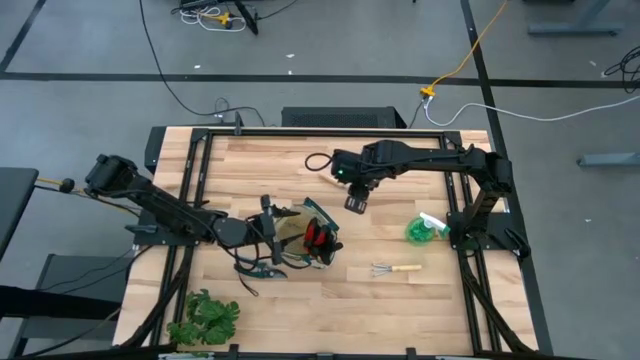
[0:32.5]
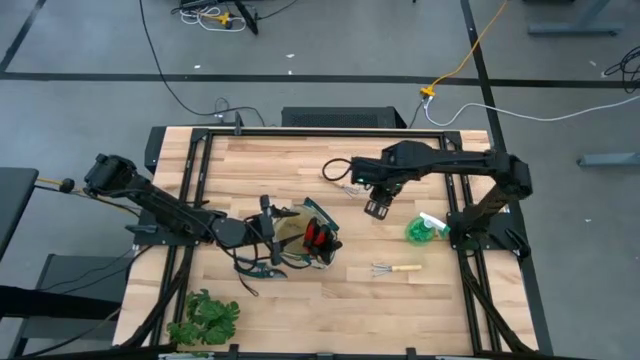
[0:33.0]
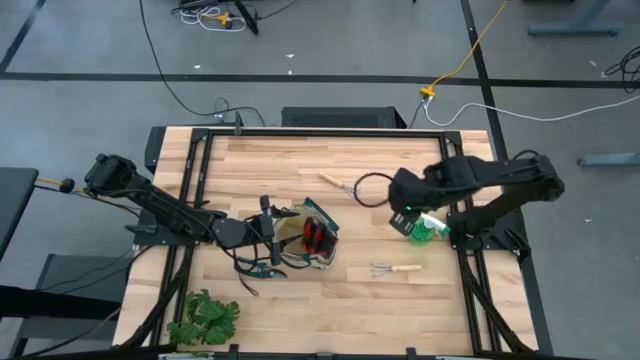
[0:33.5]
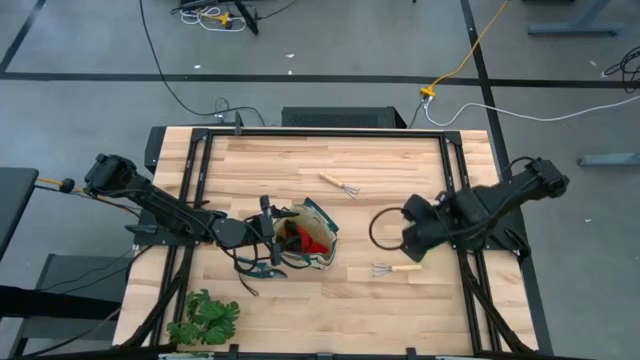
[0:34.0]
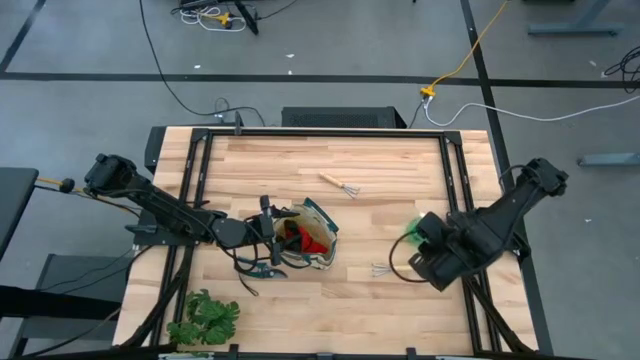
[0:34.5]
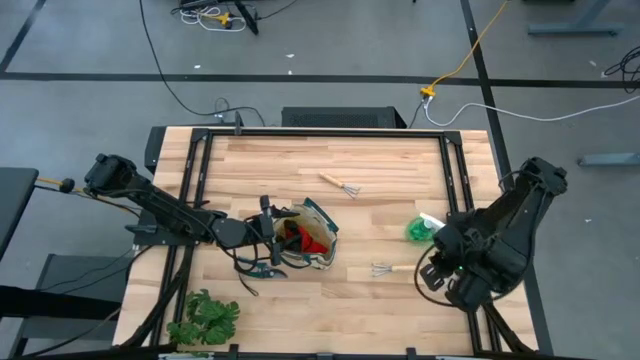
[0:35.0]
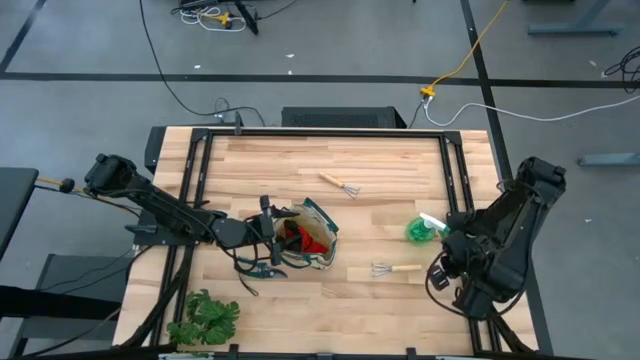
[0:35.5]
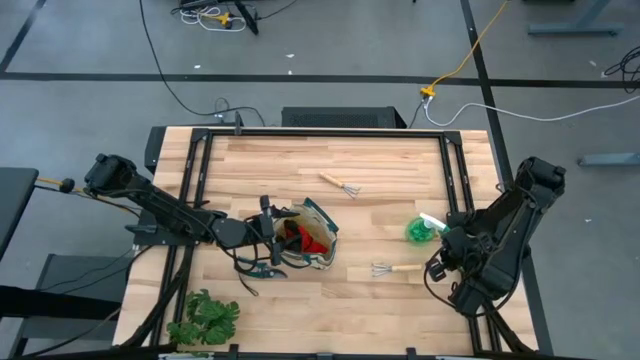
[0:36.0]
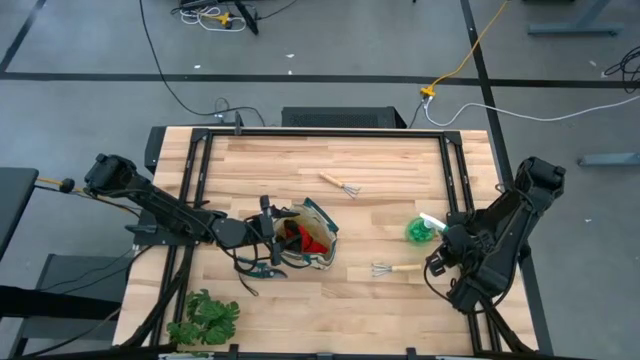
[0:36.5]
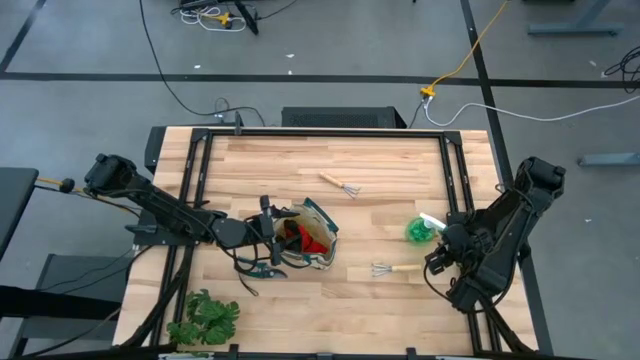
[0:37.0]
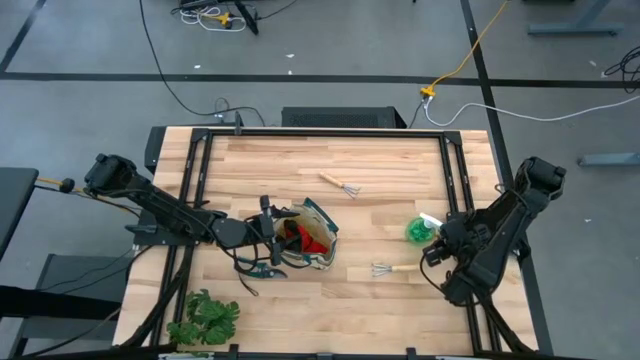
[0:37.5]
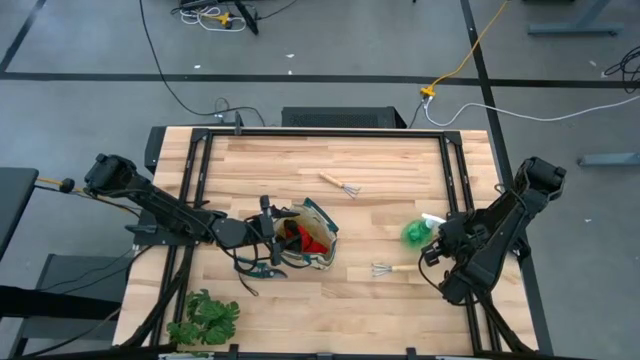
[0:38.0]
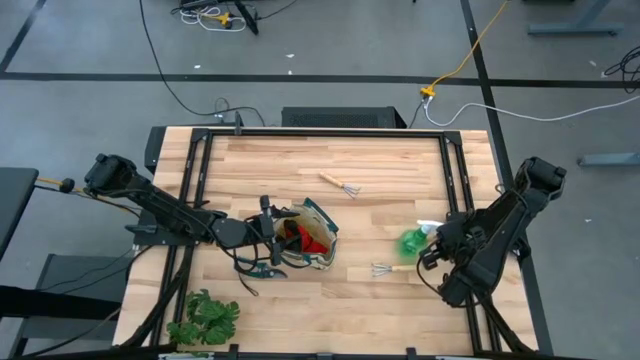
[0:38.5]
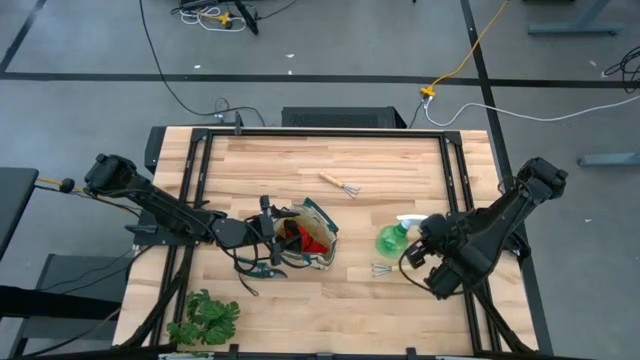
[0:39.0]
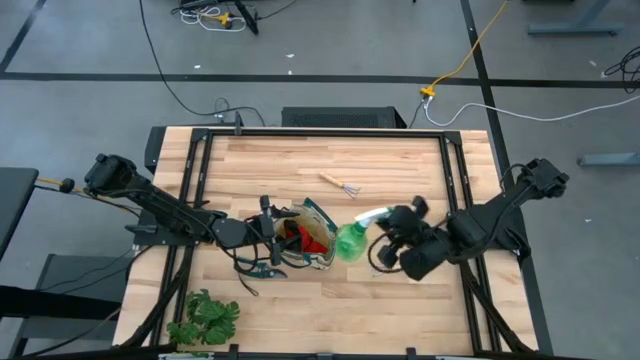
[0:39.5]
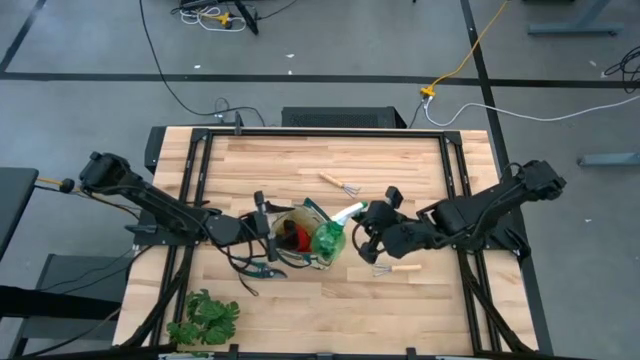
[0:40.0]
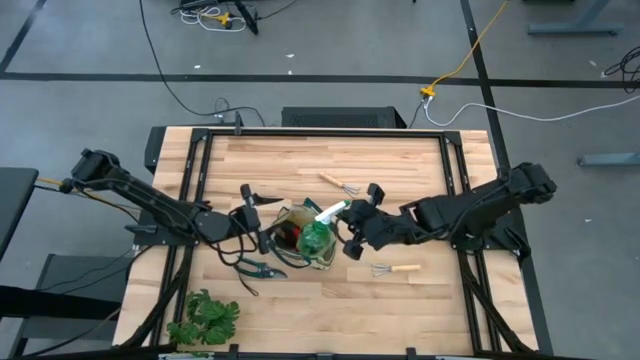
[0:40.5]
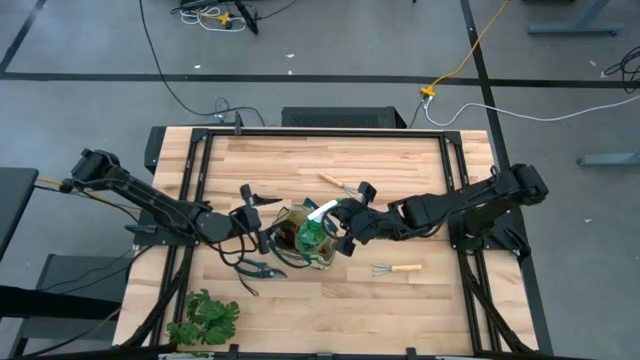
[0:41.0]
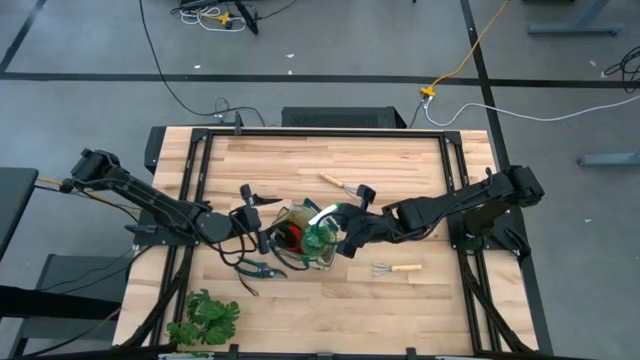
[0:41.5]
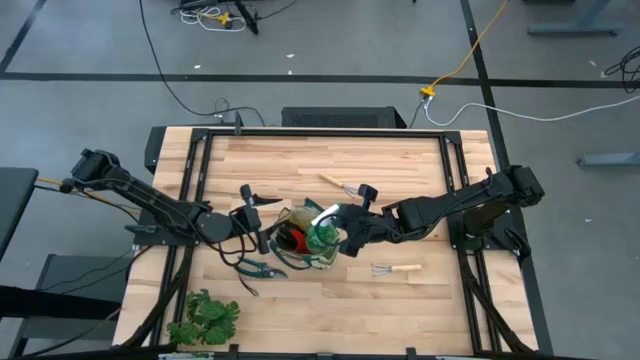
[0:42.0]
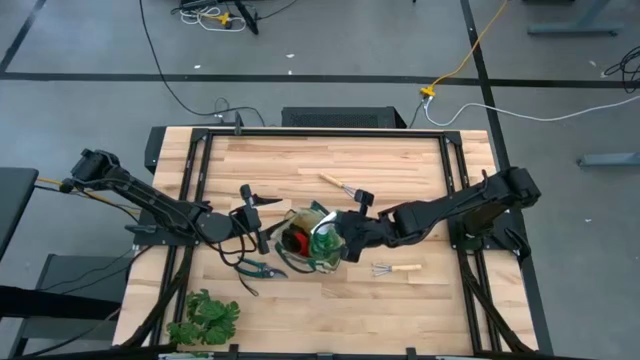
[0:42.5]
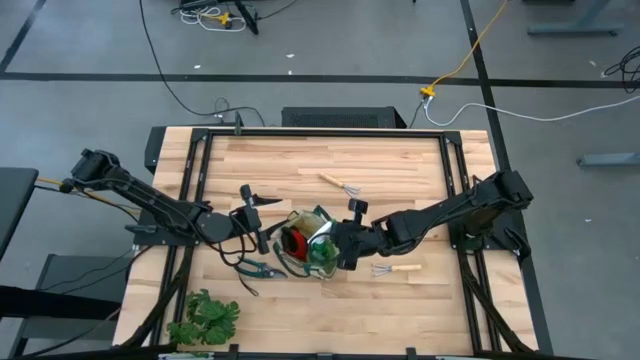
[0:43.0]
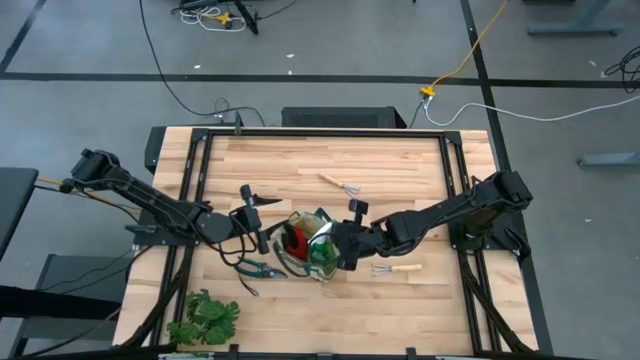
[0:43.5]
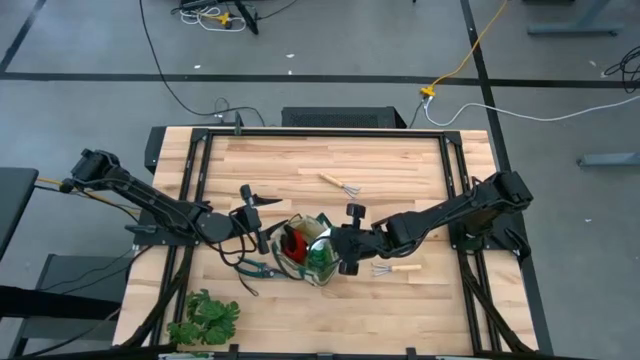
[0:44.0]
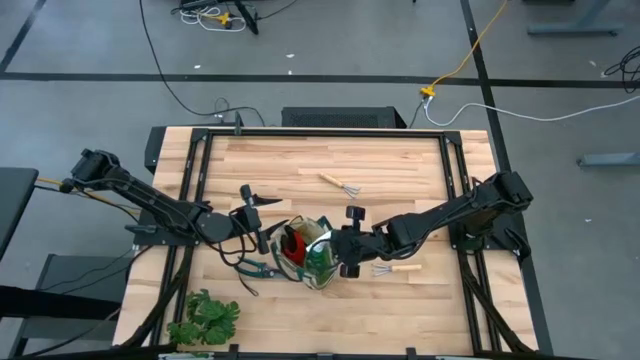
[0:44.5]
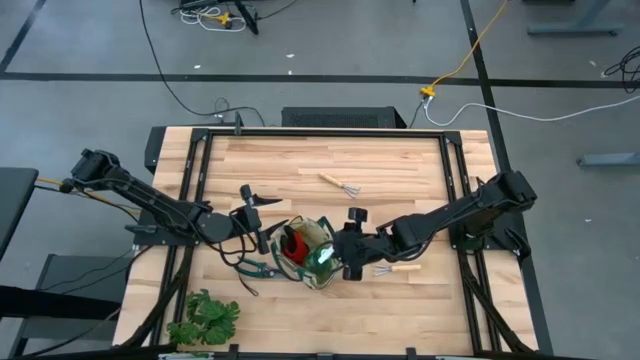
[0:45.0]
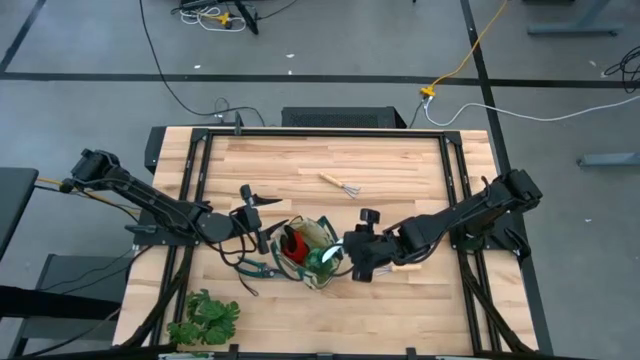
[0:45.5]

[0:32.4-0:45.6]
Task: Pick & Place Garden tools in Gardening bag
Put the green spray bottle into the gardening bag

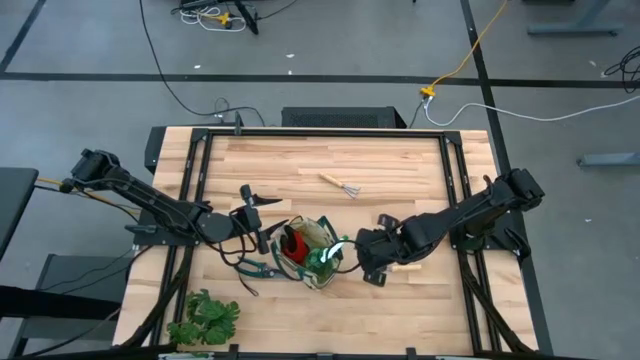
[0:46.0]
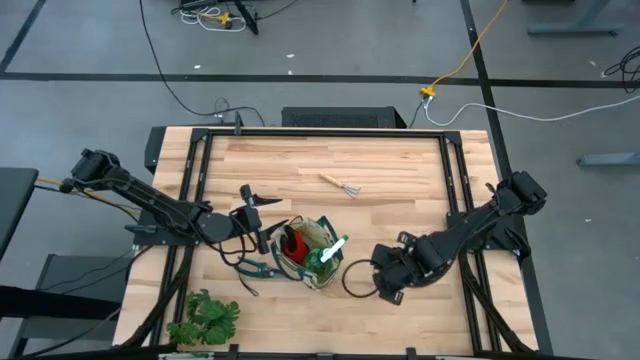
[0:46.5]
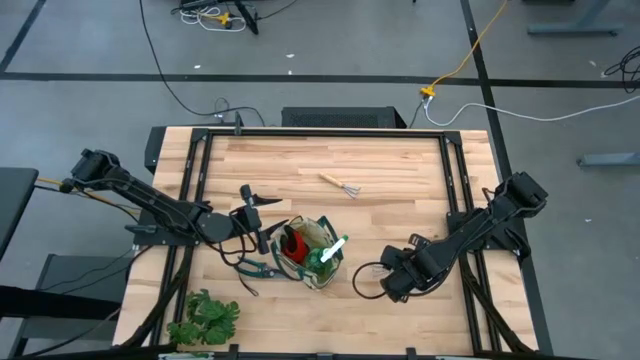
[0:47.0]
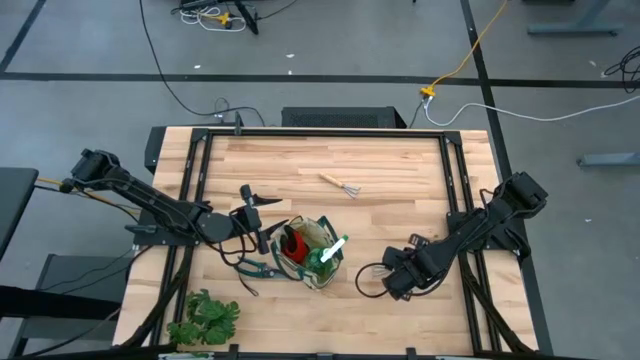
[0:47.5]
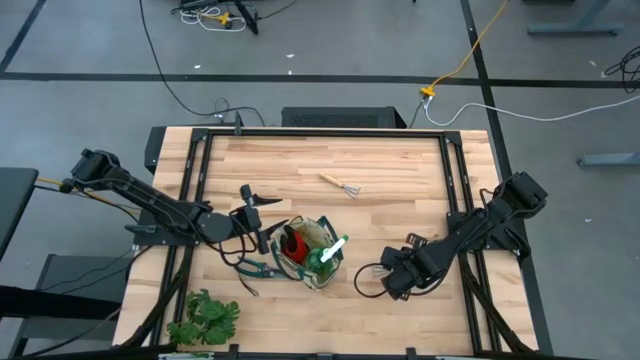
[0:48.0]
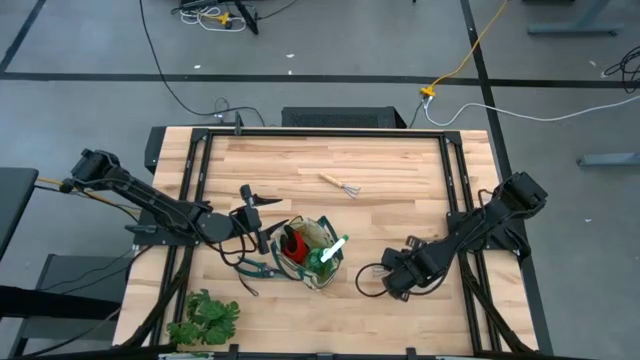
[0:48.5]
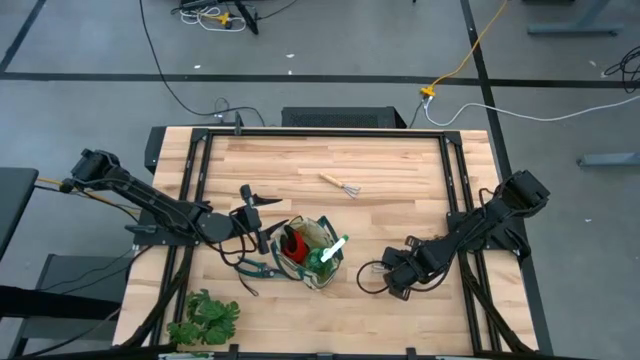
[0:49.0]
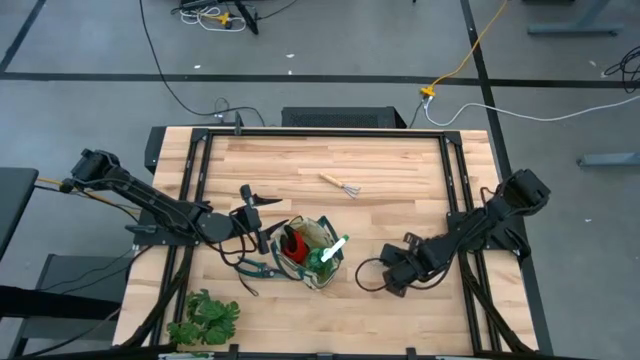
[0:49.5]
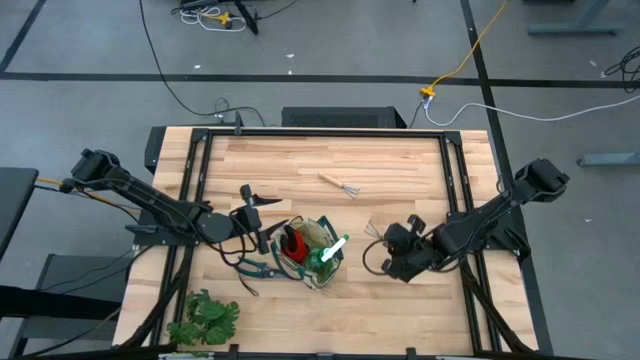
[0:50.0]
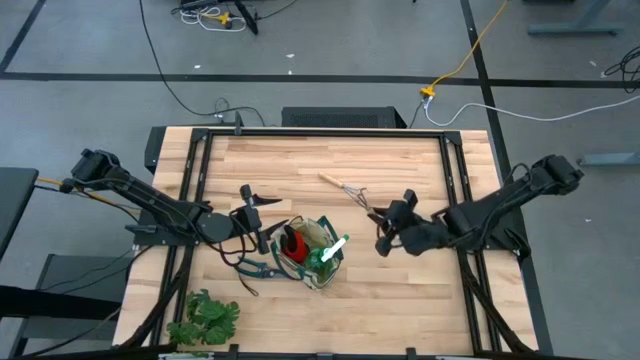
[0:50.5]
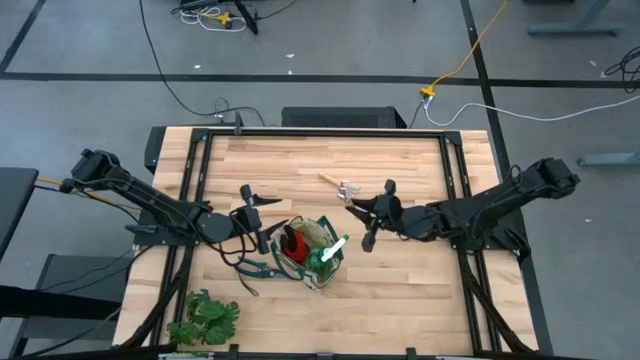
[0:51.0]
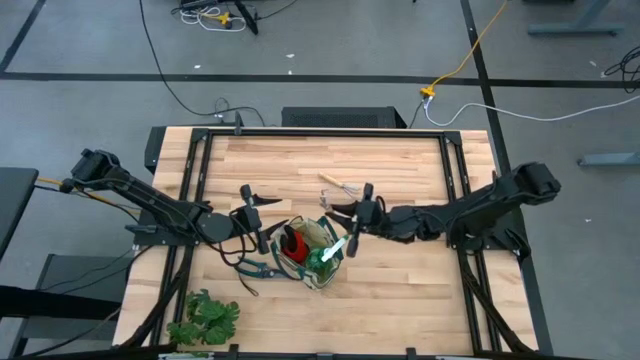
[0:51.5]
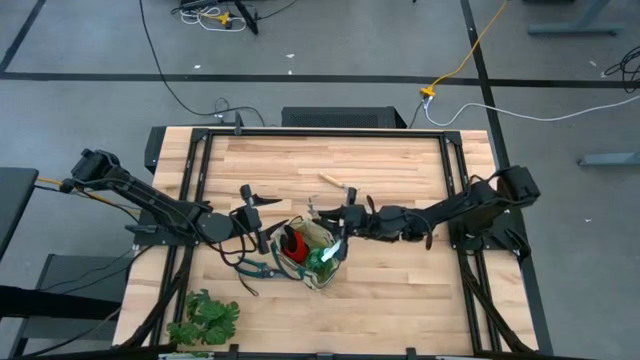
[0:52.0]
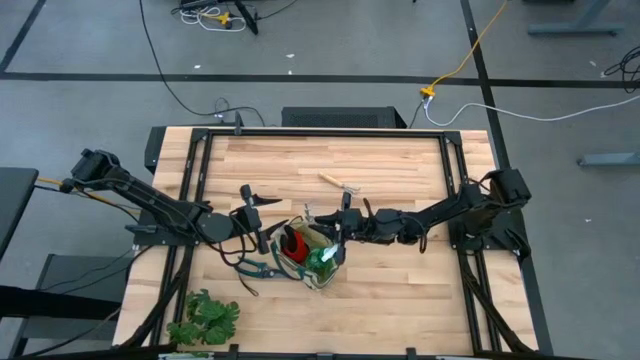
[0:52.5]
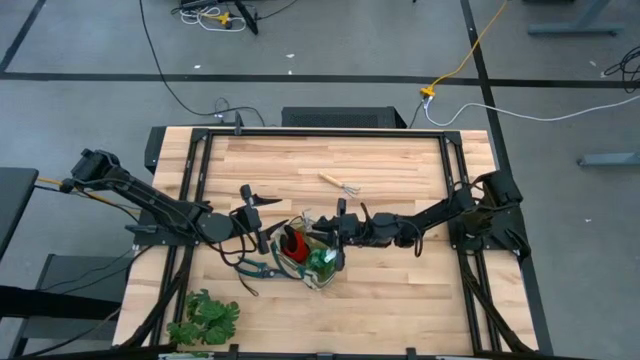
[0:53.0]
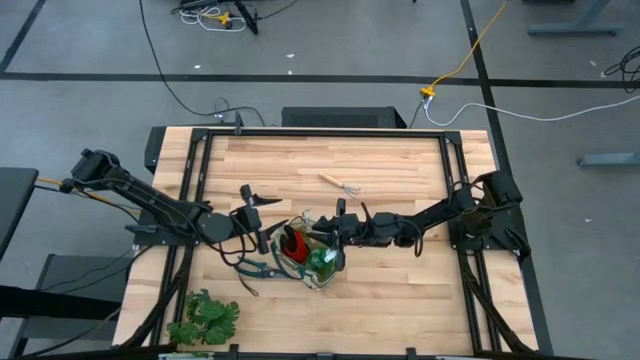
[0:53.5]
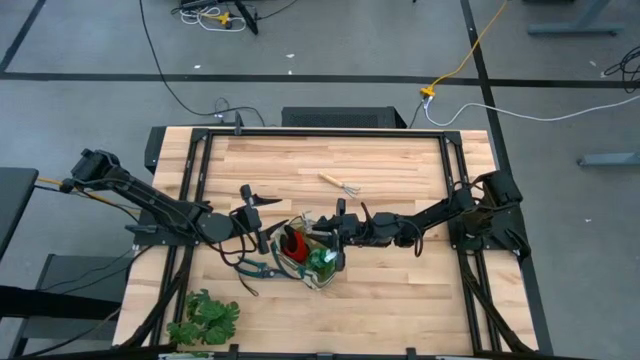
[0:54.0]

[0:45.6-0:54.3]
Put the brown hand rake into the gardening bag
